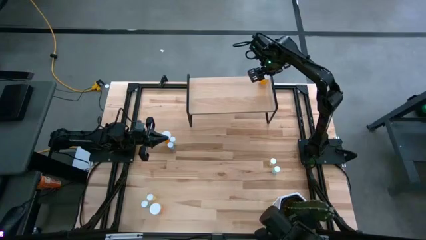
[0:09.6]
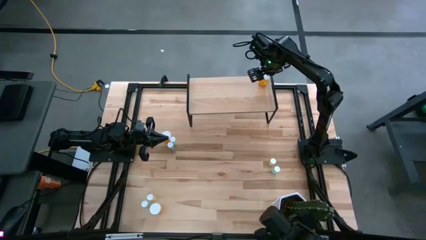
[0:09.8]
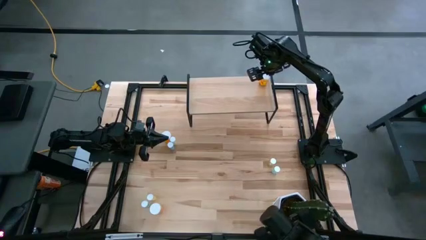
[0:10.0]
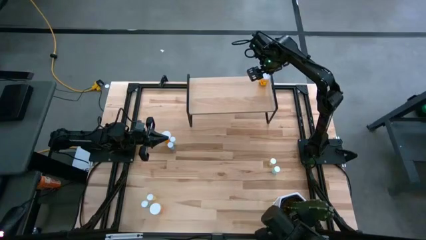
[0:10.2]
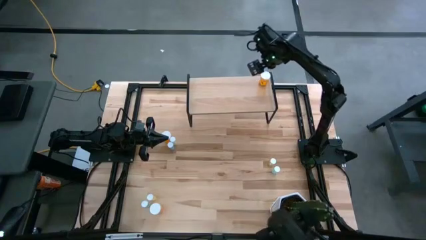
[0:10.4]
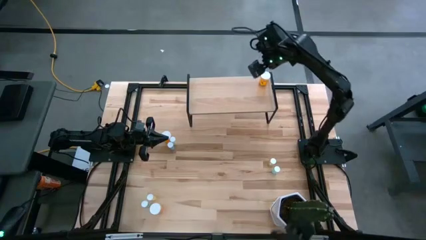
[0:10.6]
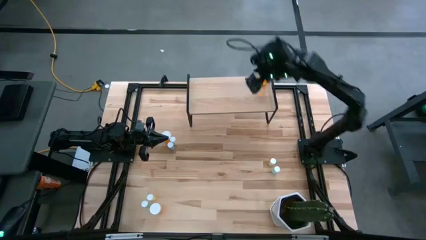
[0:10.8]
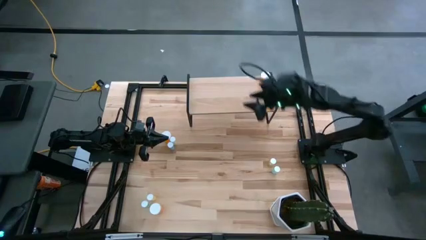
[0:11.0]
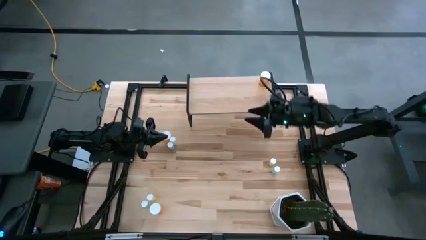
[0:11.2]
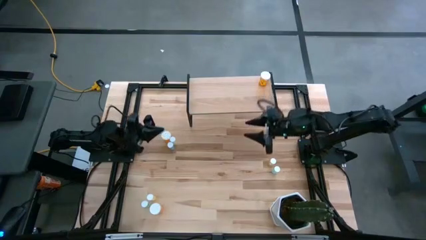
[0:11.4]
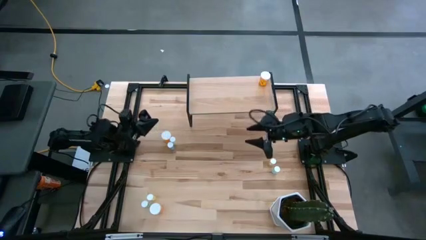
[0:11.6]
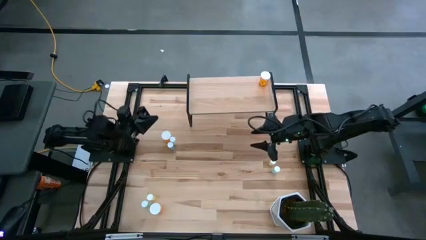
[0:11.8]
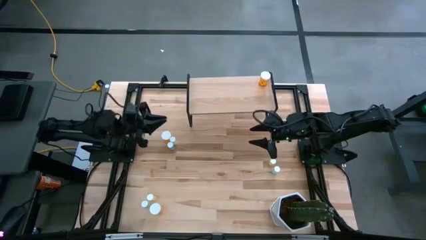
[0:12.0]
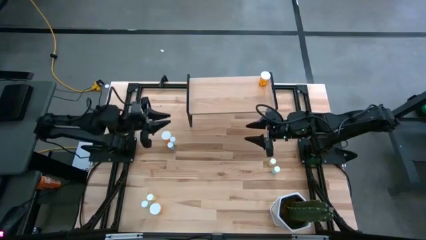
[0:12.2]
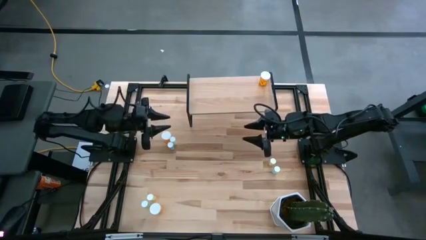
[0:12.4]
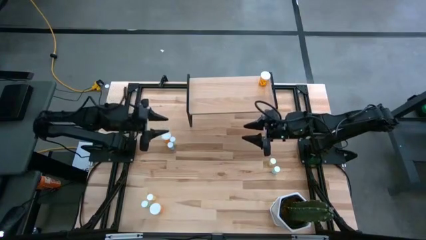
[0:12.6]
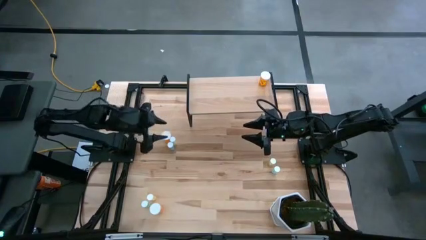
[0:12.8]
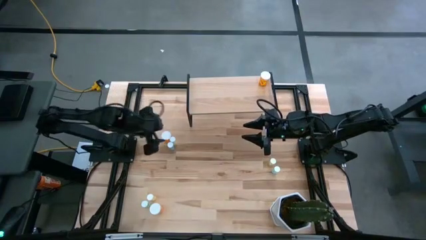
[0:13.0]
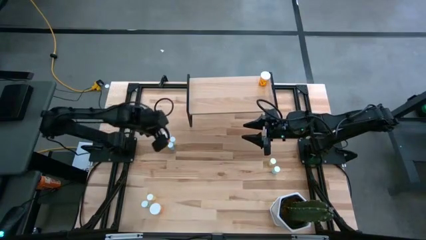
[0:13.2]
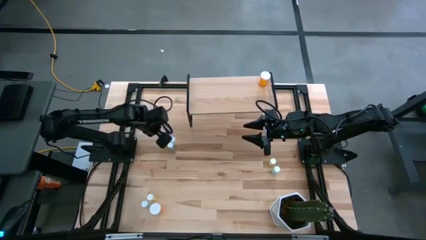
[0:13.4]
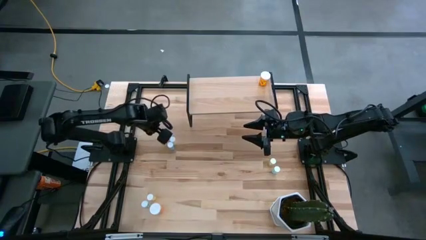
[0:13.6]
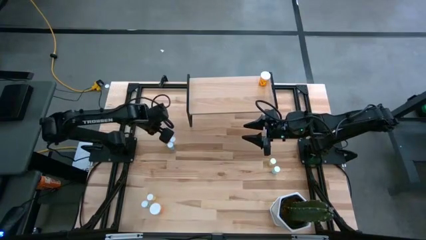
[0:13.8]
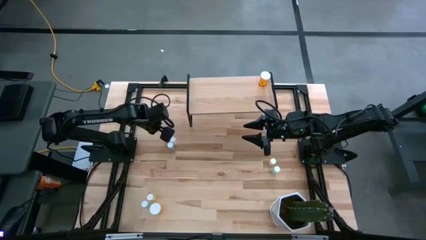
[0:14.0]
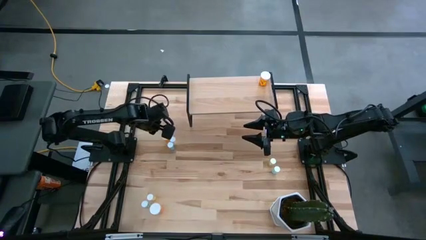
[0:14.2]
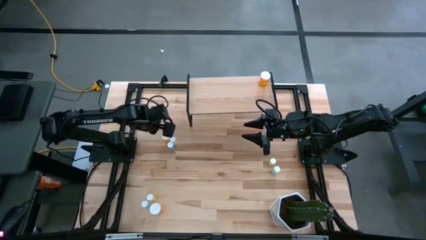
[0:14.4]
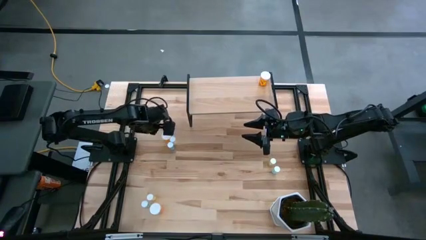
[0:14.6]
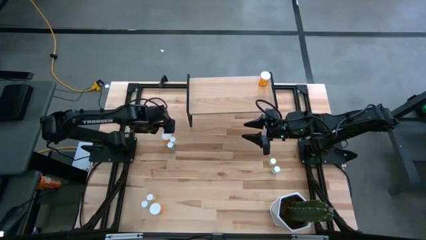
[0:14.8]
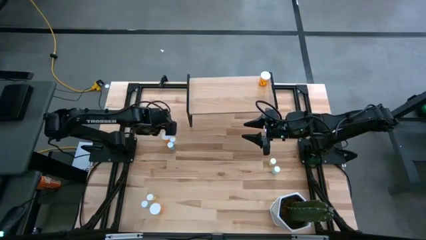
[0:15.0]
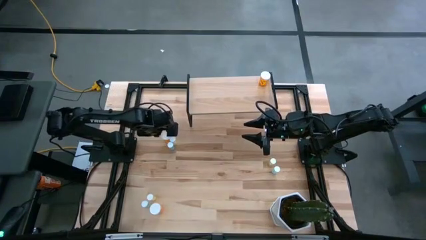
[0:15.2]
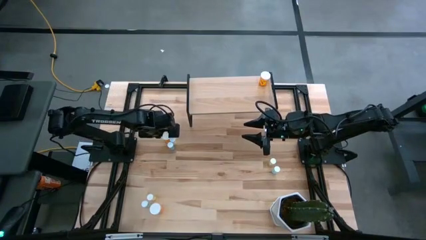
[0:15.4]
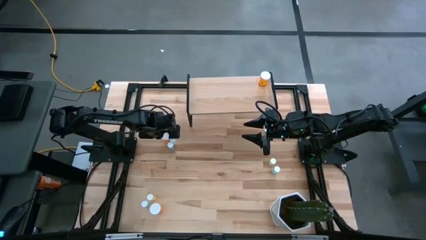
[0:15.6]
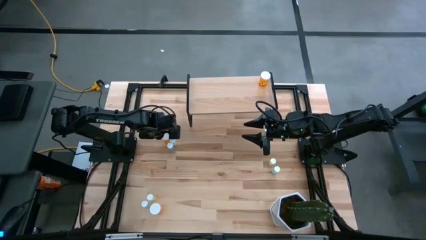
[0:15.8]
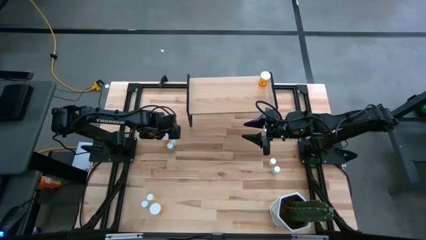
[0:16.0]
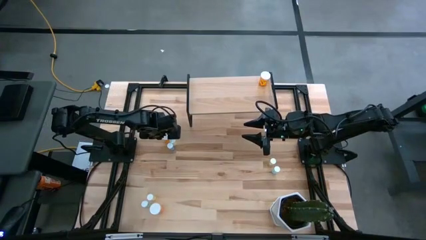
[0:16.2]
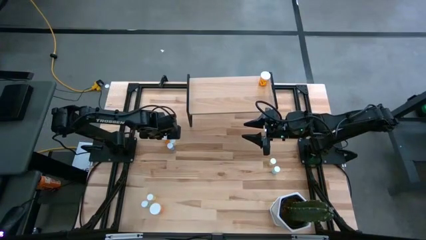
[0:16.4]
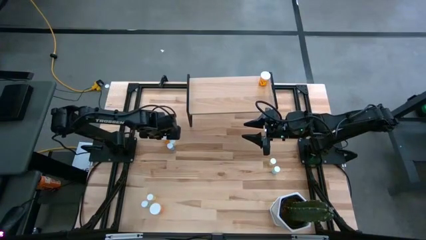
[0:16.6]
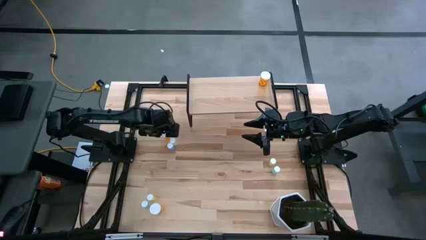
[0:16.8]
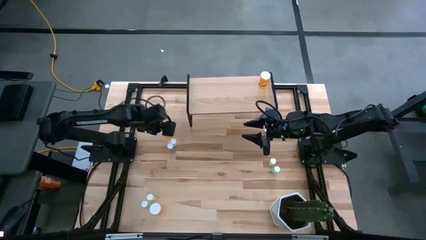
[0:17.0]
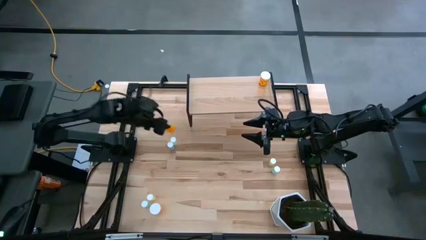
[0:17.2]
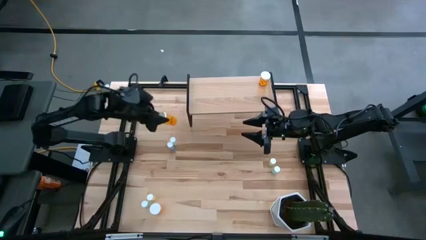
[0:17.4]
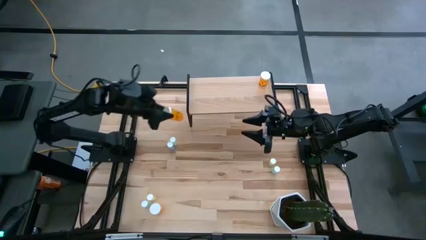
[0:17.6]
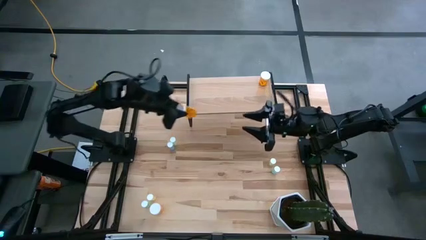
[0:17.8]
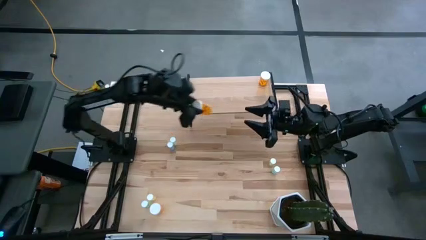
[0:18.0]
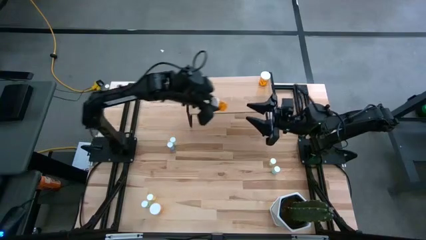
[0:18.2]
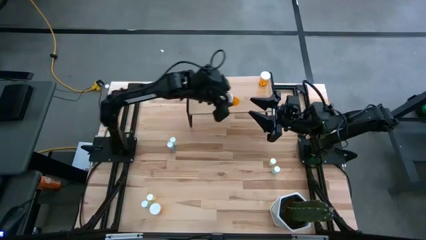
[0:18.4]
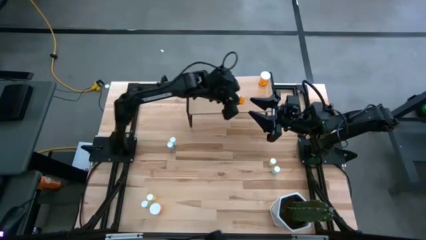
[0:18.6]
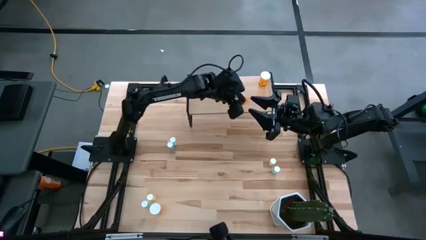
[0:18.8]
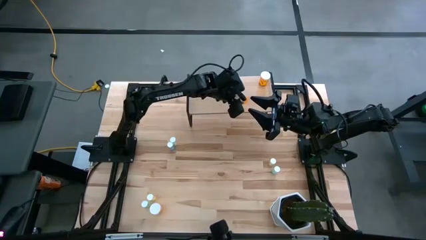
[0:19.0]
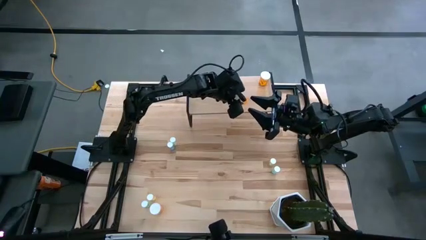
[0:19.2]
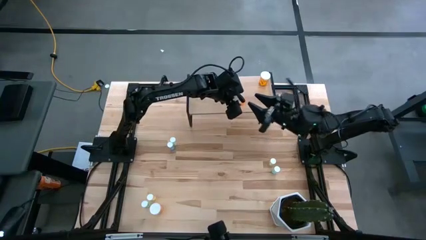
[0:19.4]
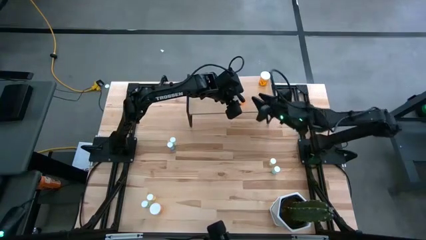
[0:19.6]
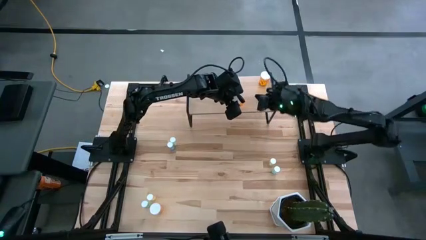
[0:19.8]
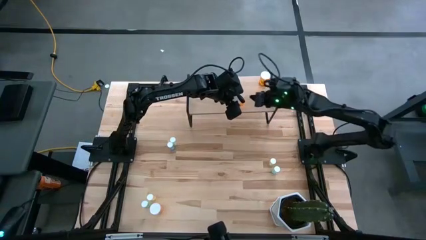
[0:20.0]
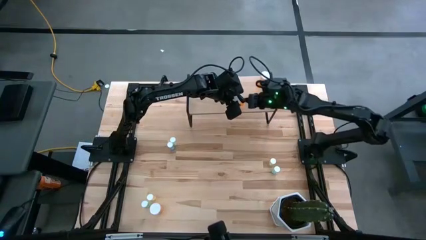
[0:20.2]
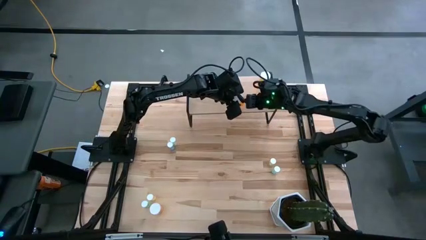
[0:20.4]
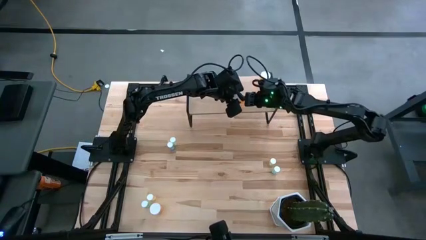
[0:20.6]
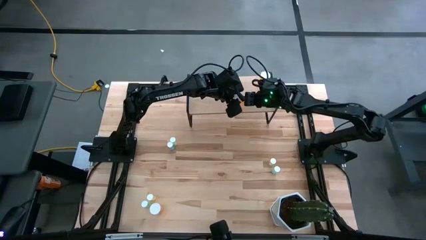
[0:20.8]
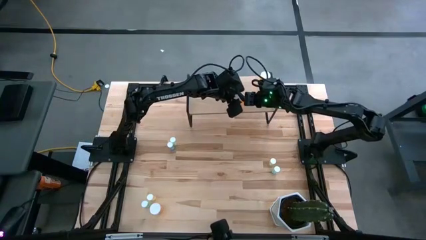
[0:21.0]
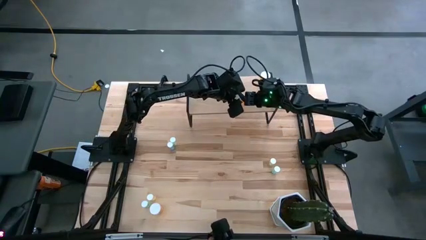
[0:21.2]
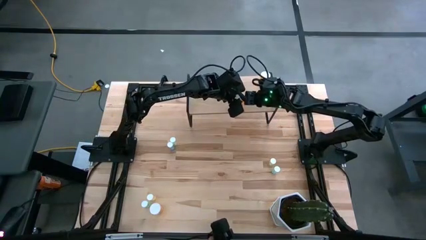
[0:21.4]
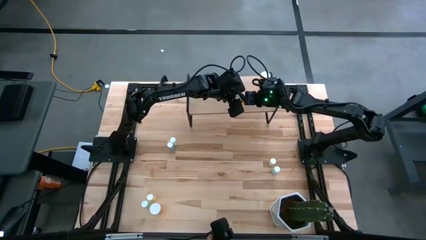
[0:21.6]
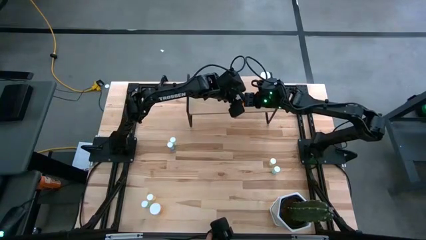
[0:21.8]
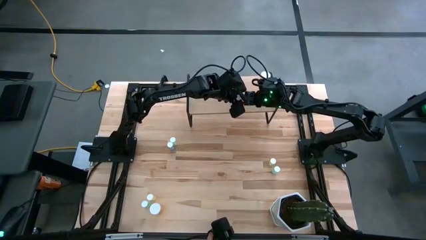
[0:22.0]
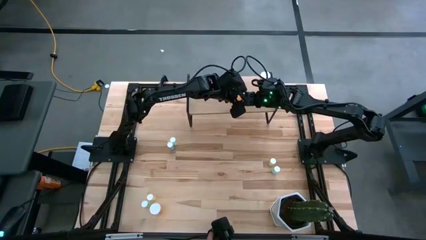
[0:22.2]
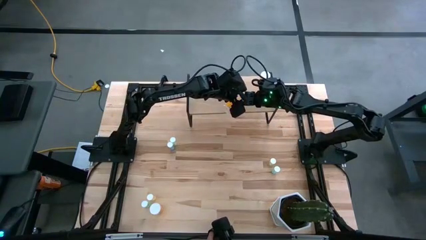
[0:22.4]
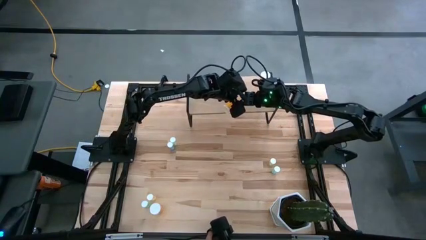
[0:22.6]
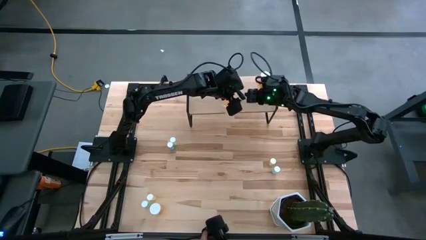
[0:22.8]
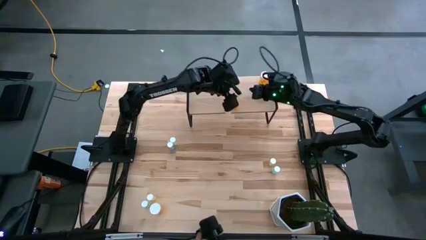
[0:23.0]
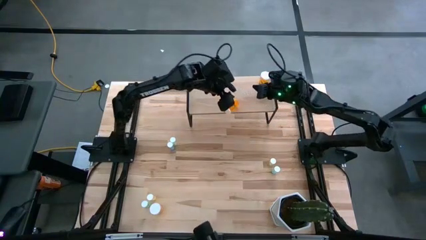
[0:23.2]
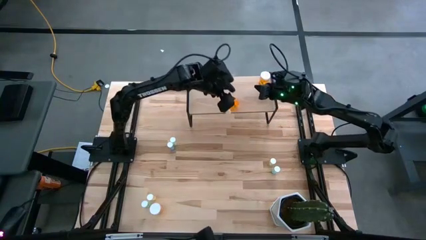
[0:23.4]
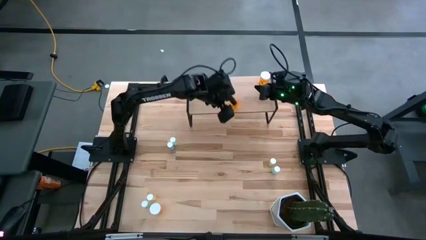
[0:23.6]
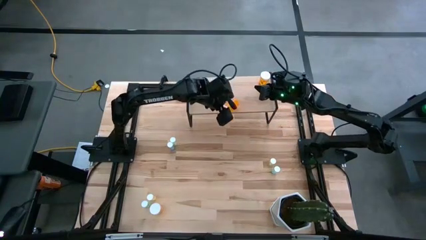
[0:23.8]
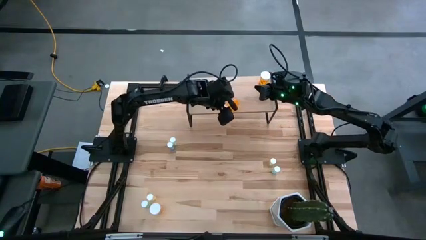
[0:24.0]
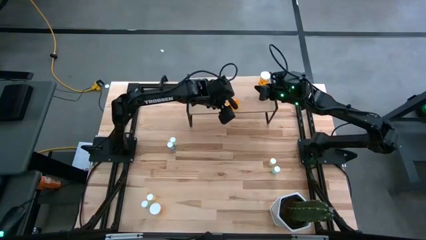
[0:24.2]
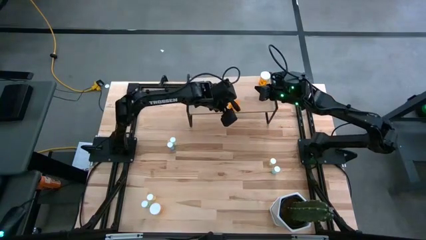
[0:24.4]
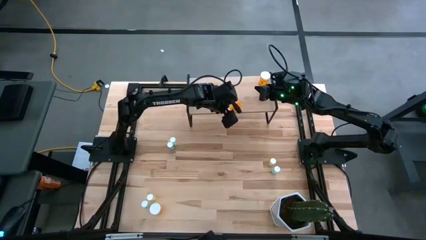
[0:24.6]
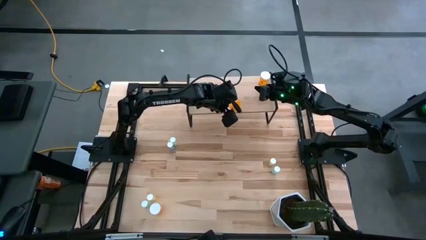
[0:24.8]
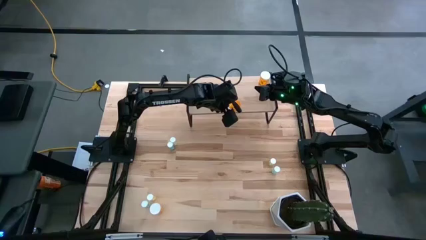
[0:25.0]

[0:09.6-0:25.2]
Task: Pick and place medicine bottles onto shelf by color
Put the top orange pill bottle on the shelf aligned with the orange pill bottle
